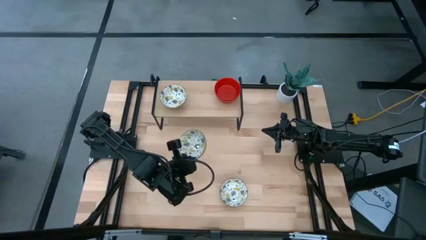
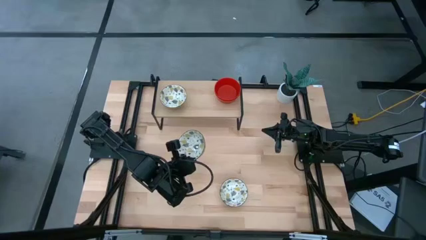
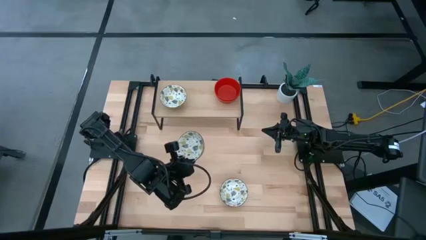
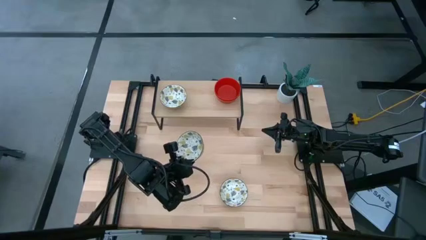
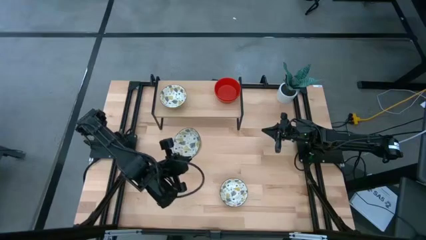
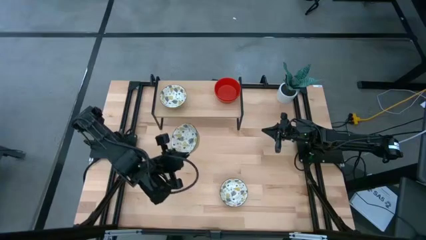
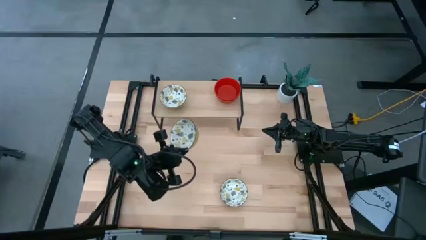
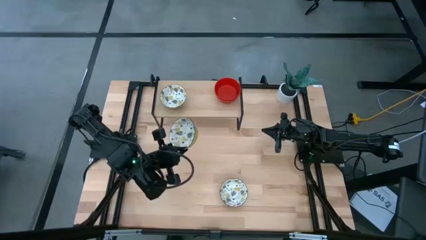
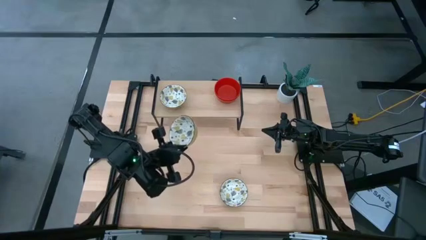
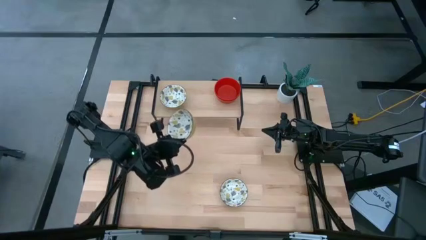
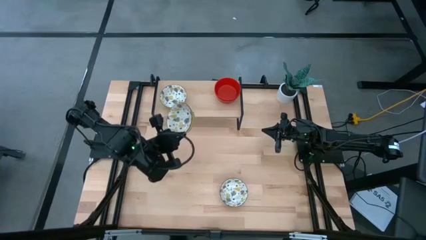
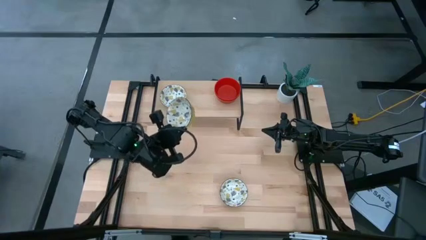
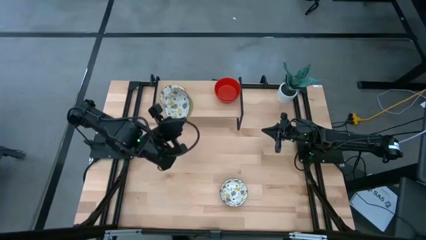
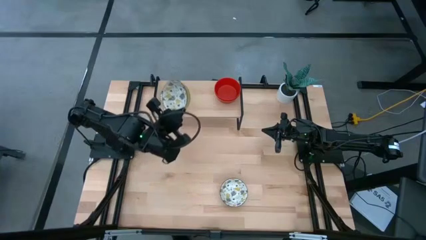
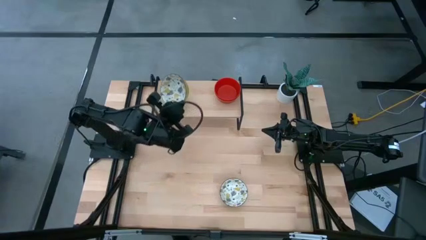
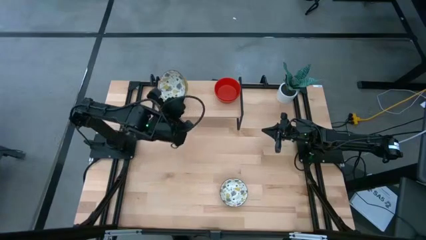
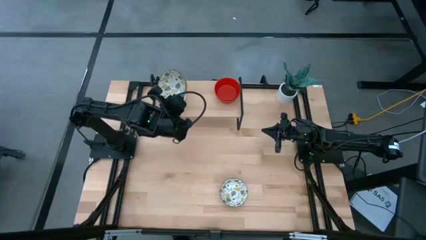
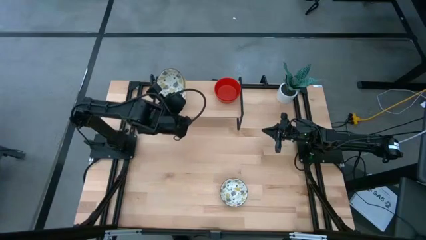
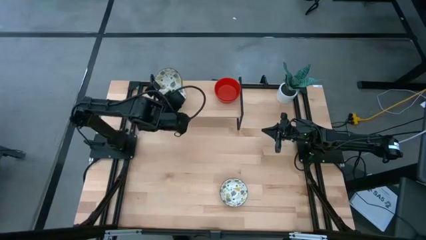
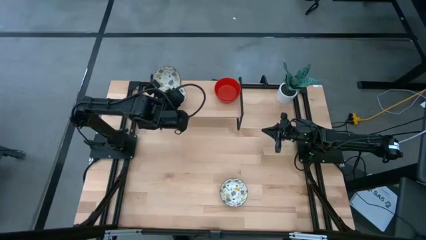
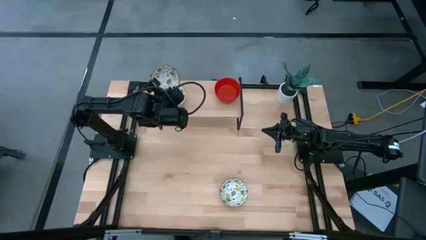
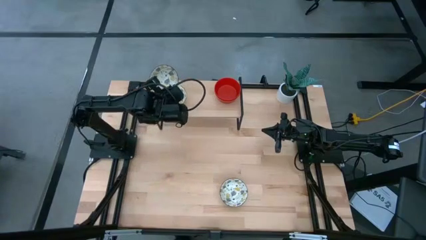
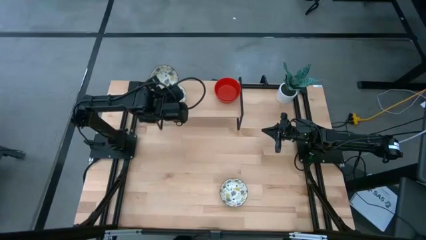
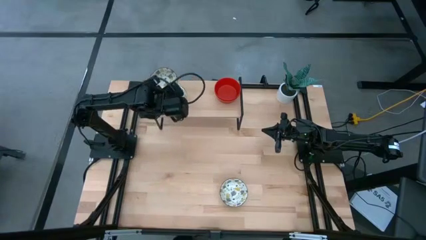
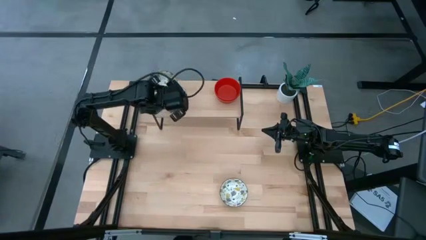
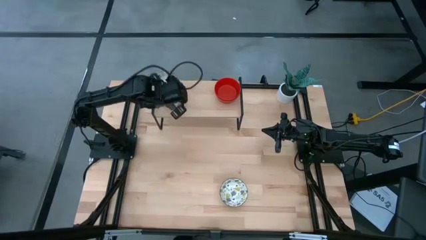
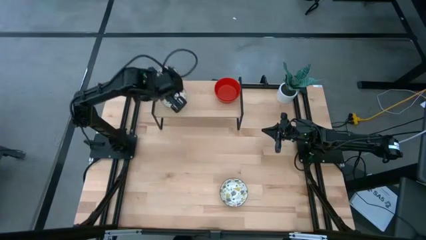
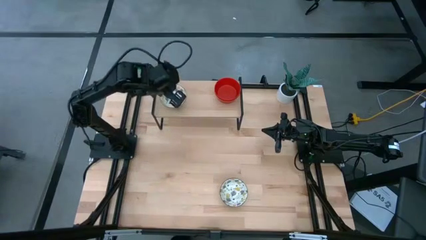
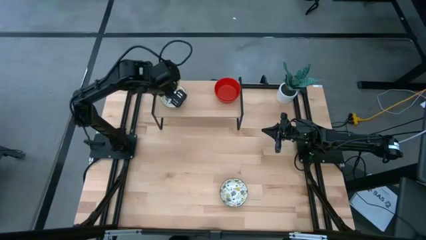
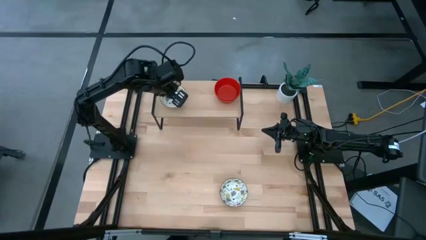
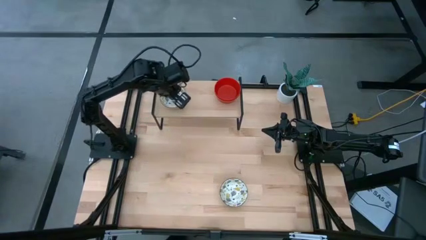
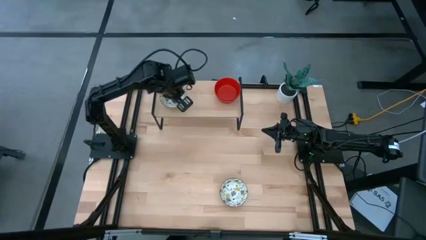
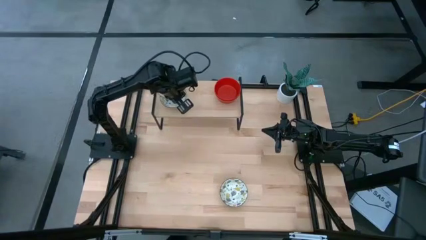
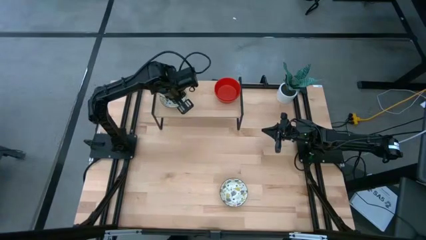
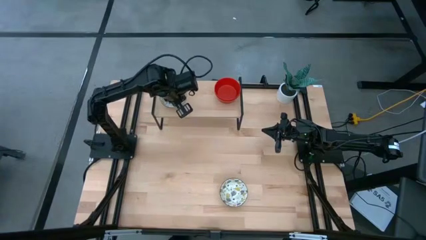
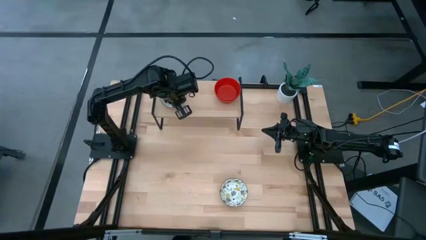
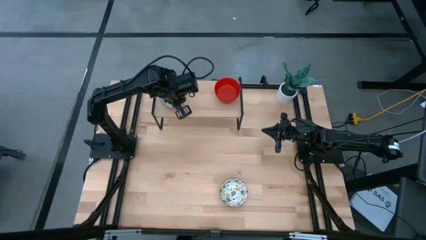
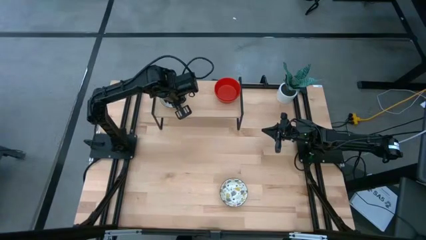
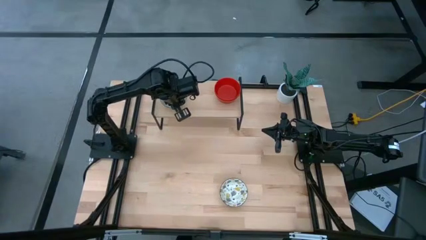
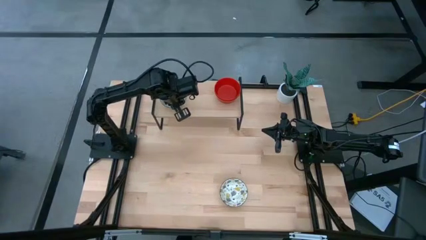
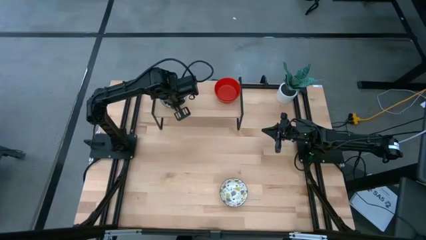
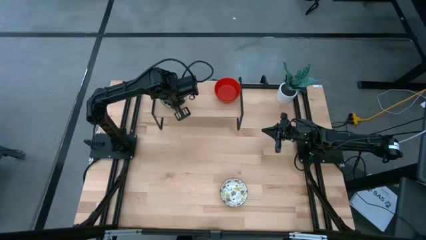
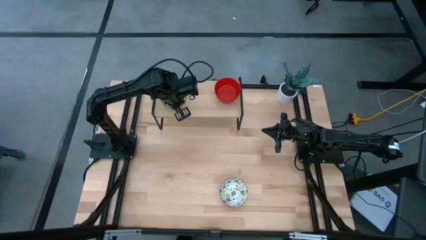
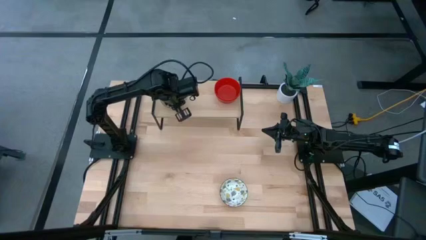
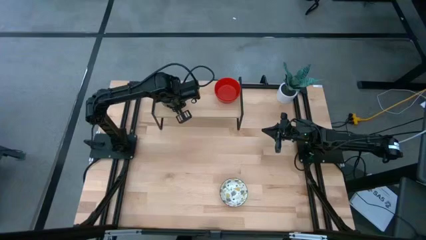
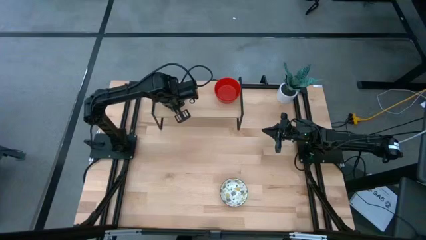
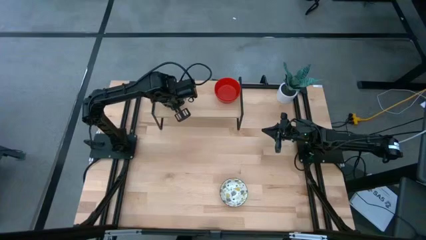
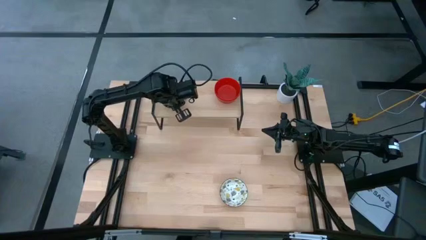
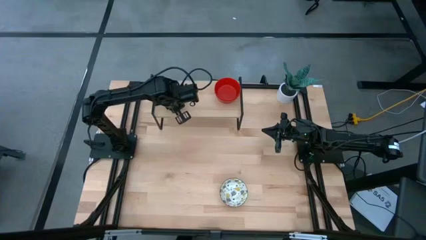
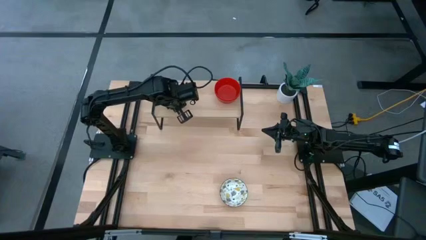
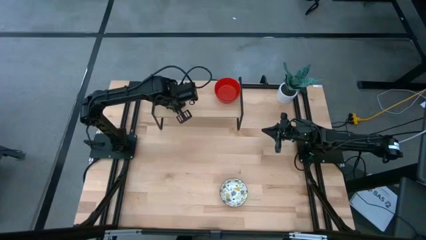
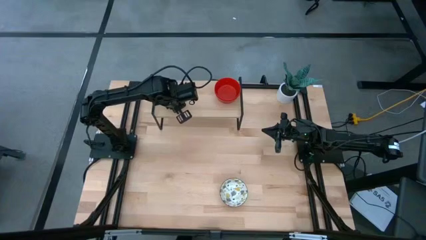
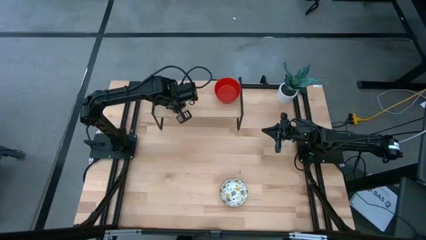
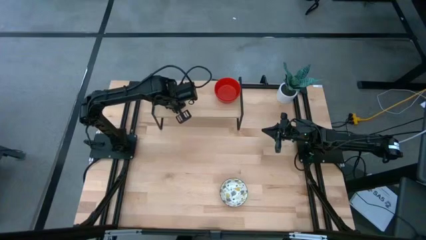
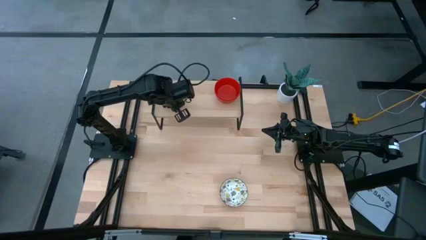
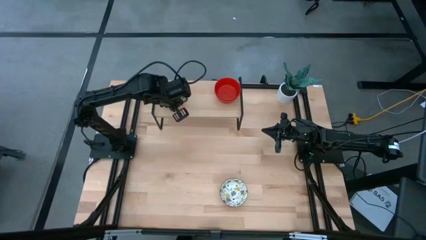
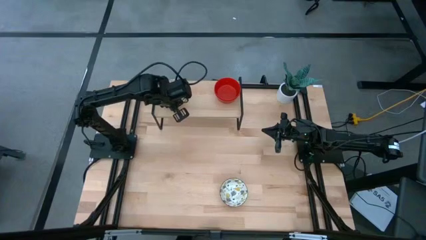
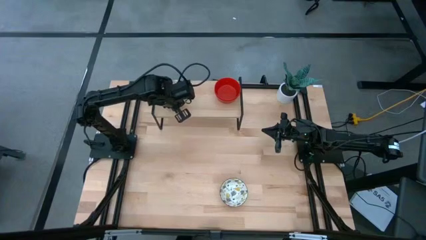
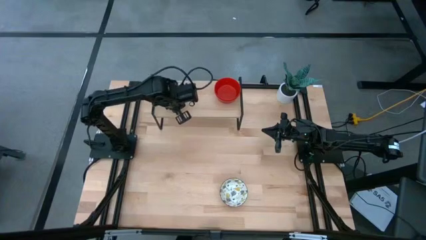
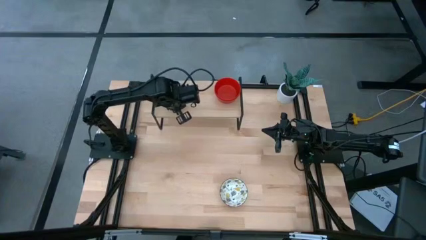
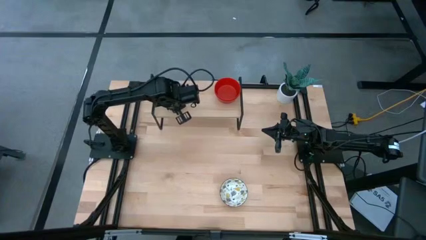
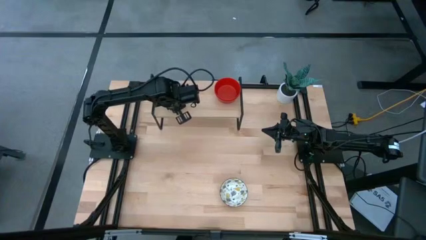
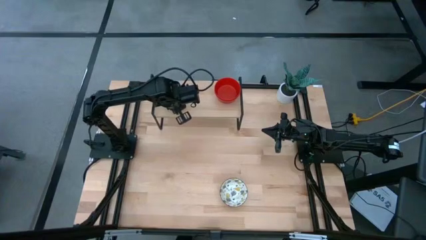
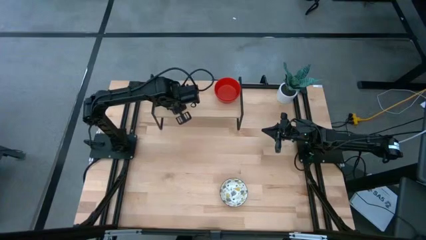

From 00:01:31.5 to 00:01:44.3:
Task: Pick & Place Mini bowls
Stack the top yellow patterned bowl on the yellow patterned bowl on the shelf
